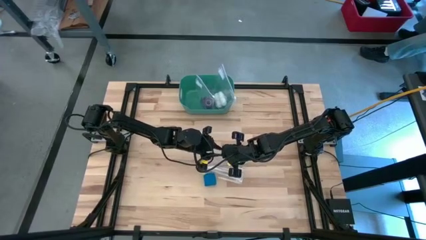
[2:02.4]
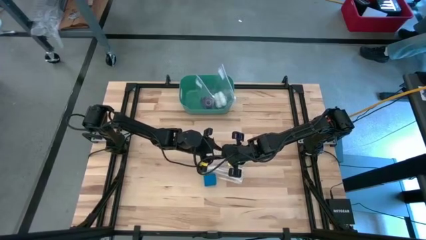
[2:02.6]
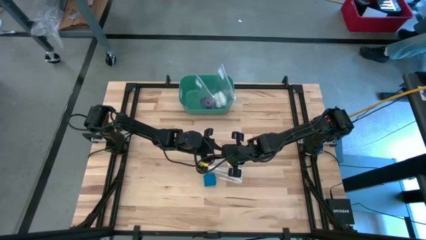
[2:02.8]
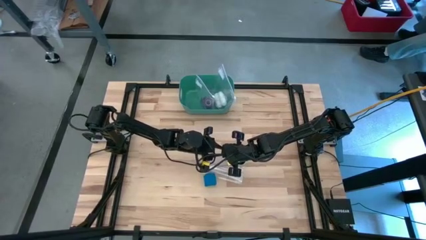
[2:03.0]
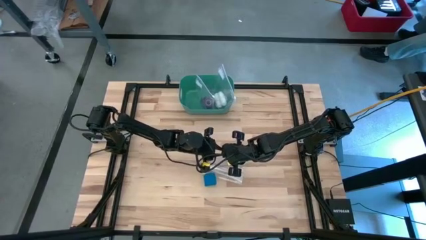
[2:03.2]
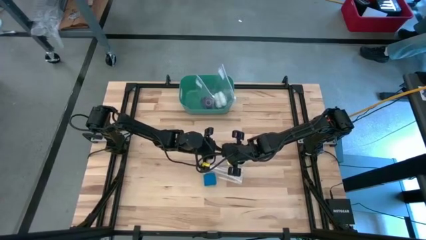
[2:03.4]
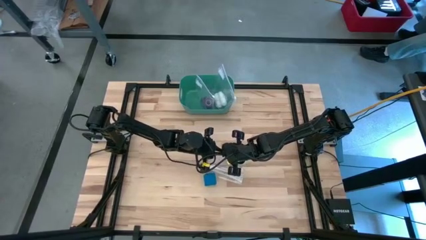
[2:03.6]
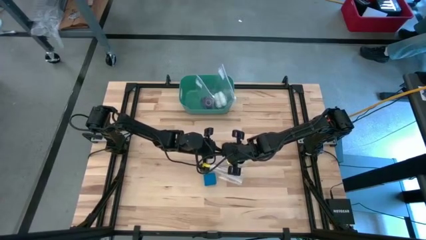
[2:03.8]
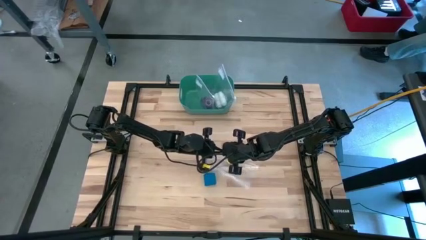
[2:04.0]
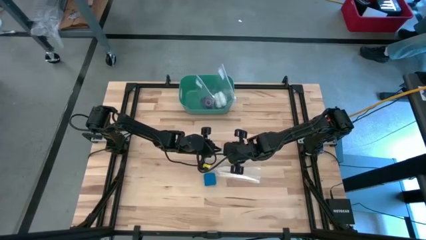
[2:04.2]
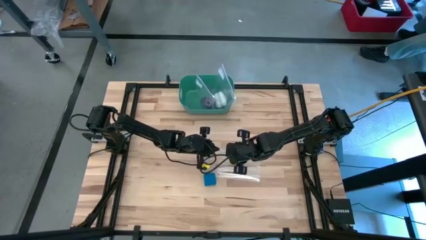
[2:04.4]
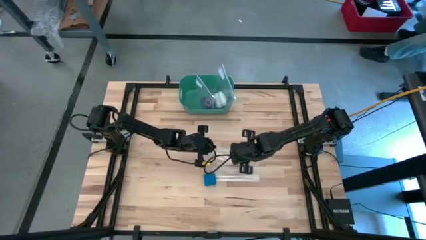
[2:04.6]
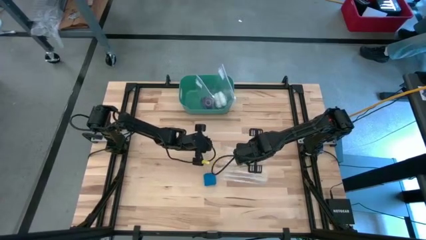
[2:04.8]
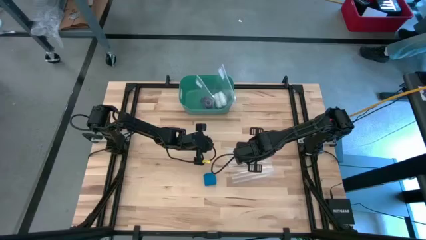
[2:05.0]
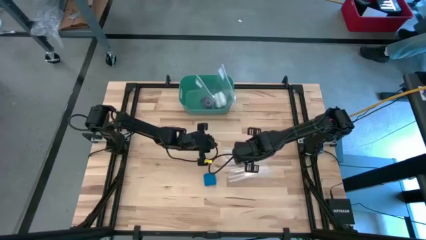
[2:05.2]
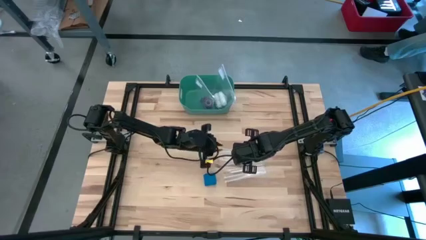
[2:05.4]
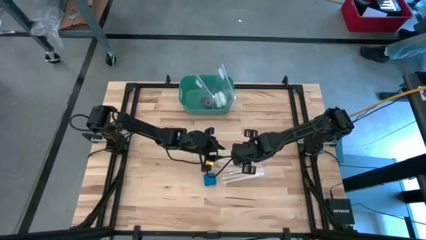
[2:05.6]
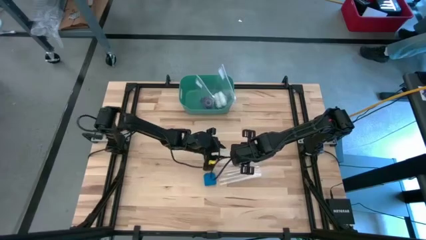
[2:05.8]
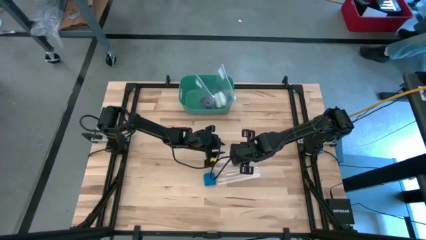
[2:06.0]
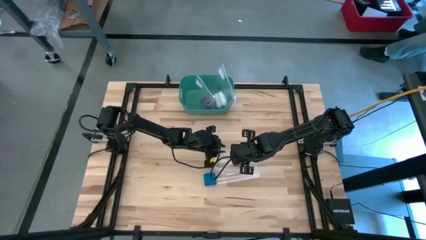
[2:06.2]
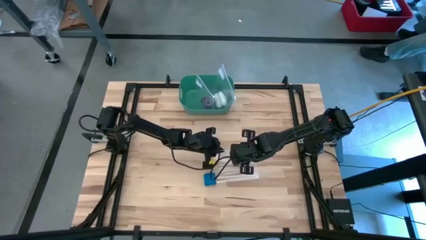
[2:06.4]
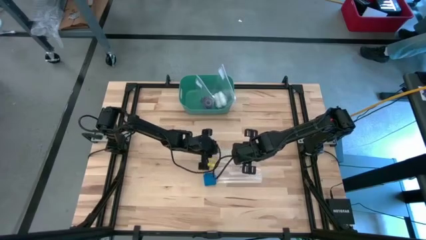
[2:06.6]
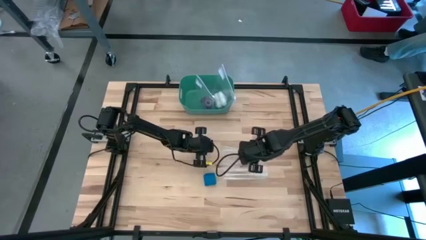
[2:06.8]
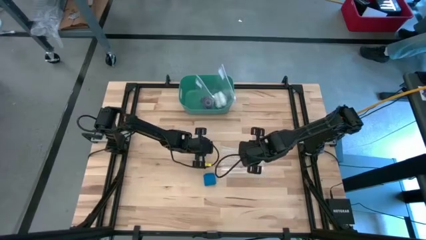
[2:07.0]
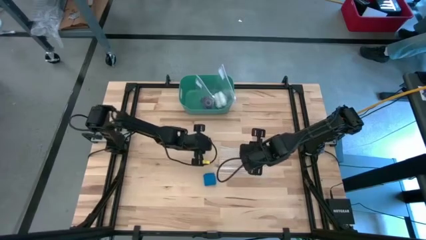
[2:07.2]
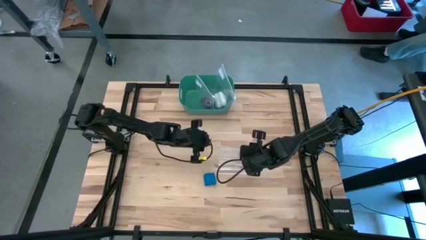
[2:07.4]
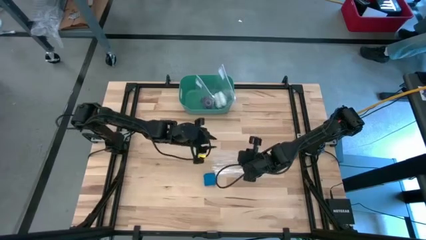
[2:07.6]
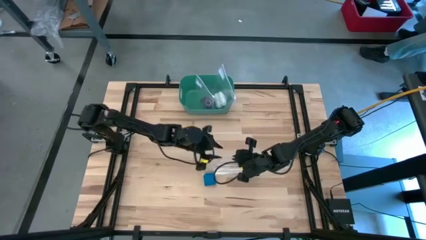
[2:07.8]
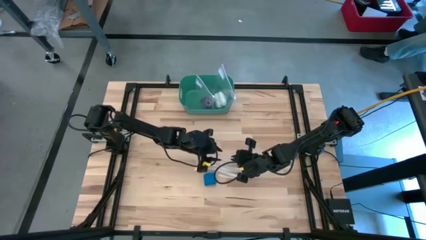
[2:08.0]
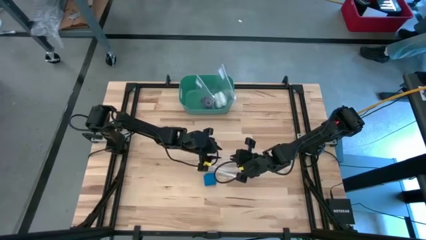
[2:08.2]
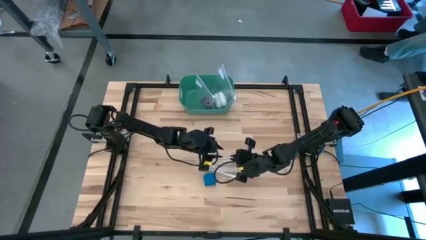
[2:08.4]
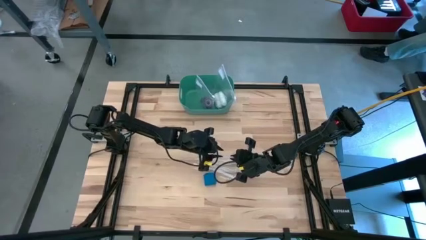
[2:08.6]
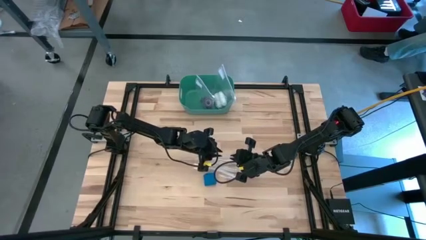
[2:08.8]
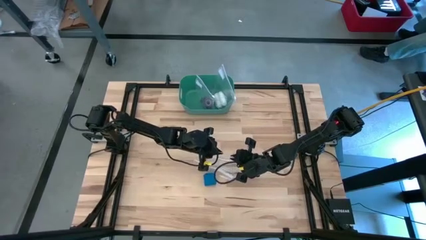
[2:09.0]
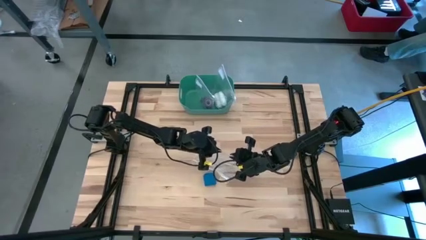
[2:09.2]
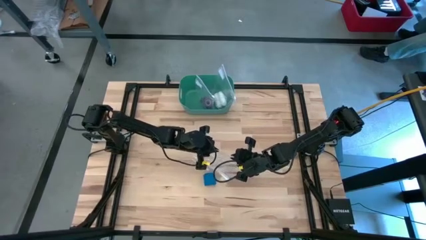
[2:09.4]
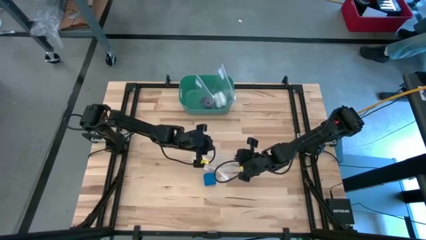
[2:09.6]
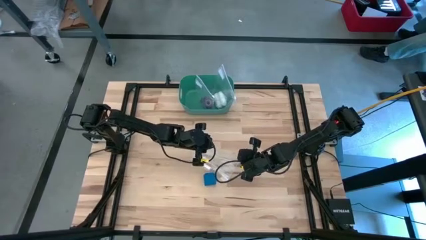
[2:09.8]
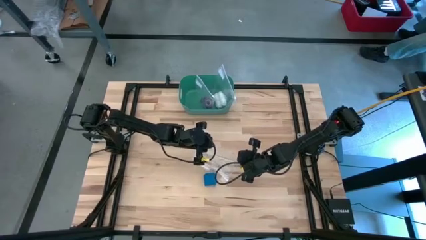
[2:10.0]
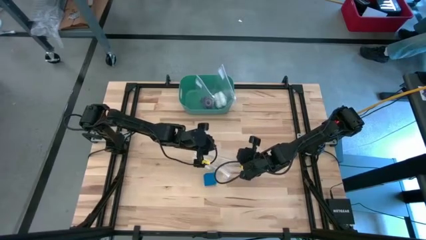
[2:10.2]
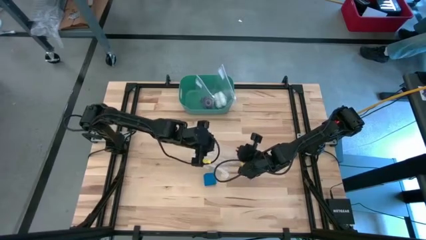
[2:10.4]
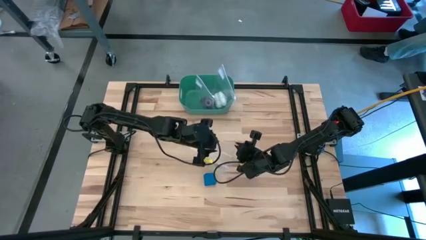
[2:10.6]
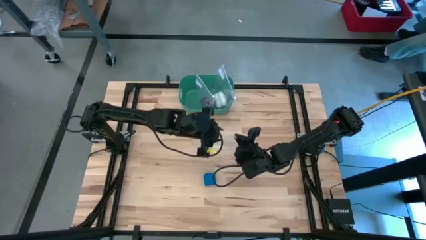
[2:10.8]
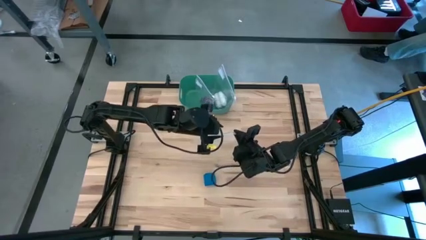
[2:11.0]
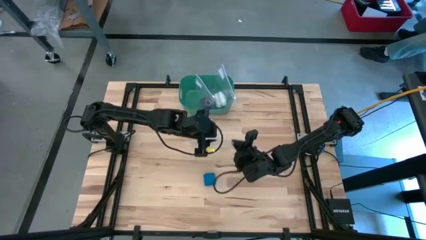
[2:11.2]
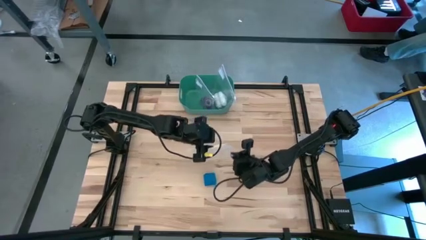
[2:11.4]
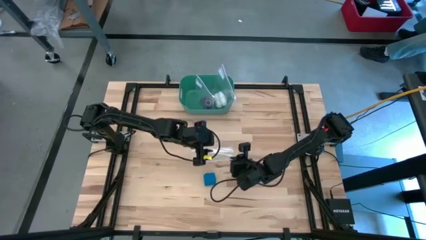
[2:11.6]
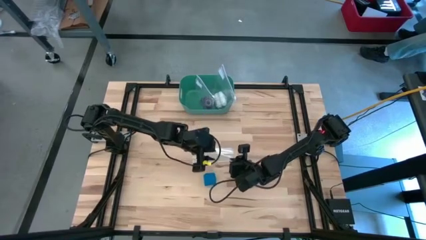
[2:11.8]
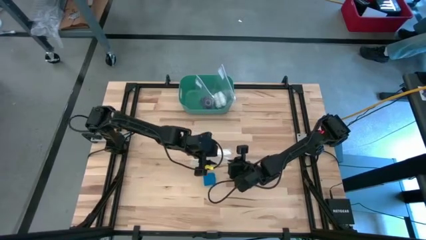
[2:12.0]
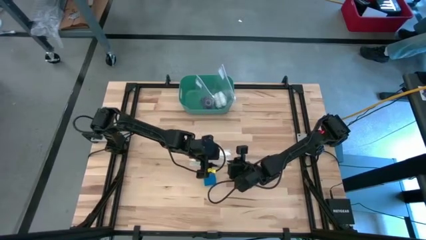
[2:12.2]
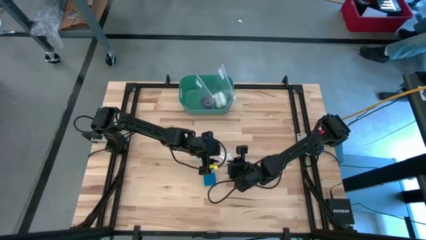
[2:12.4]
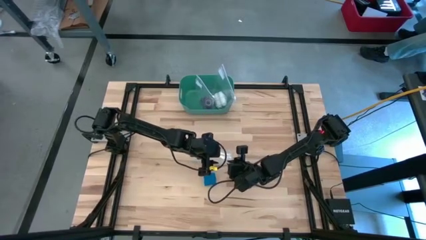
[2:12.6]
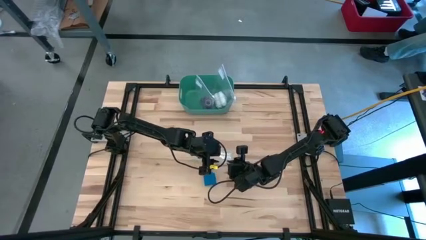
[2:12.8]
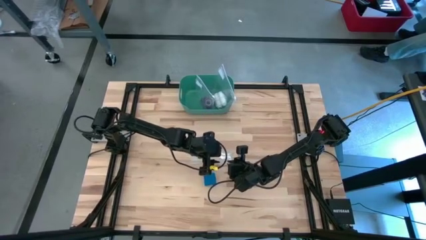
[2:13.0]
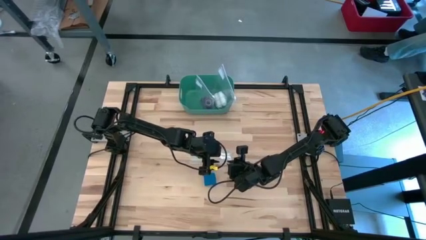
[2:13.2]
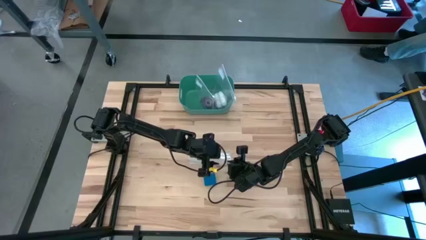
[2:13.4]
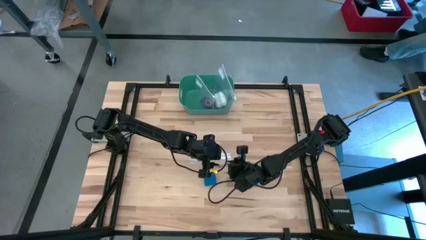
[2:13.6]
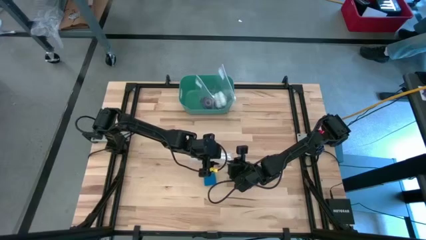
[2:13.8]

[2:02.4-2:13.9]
Task: Roll bandage
Open the transparent zip bag
